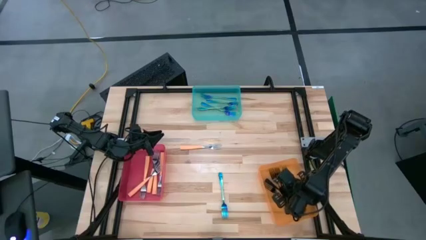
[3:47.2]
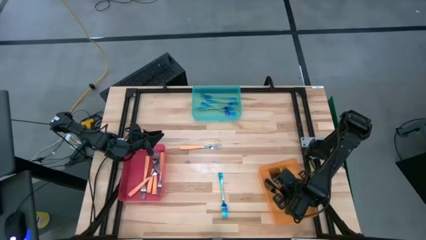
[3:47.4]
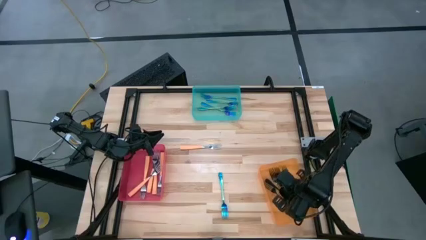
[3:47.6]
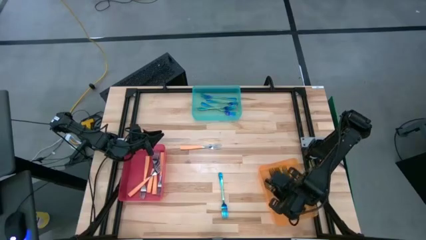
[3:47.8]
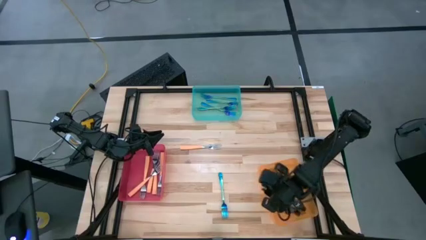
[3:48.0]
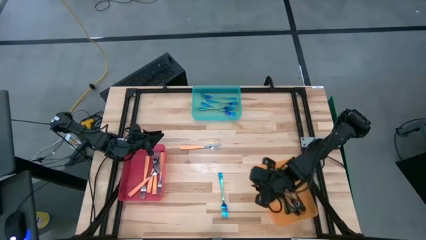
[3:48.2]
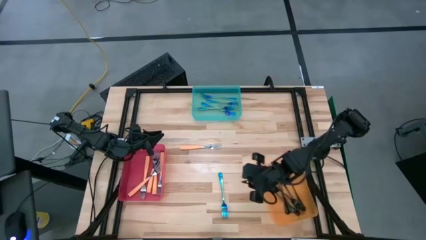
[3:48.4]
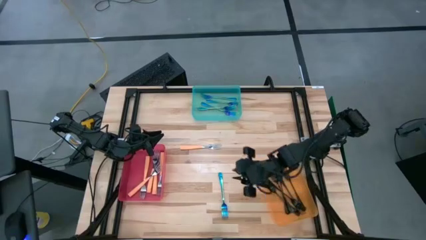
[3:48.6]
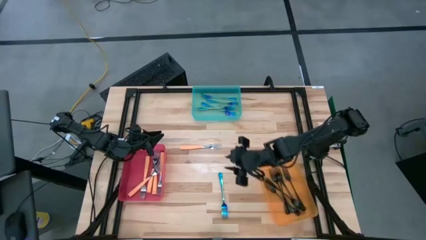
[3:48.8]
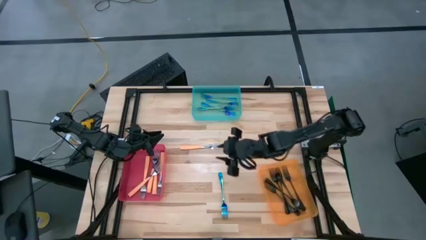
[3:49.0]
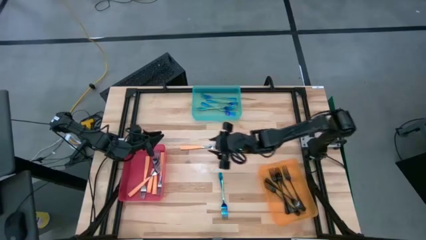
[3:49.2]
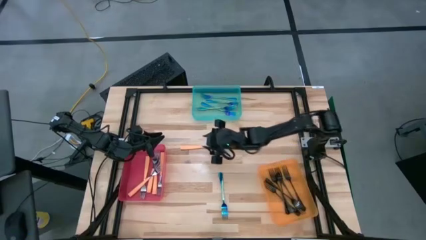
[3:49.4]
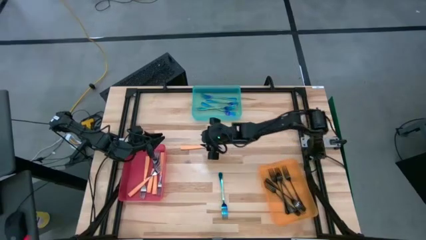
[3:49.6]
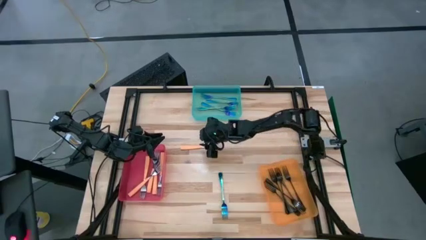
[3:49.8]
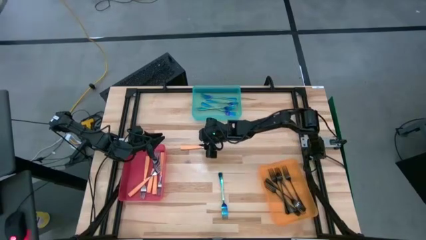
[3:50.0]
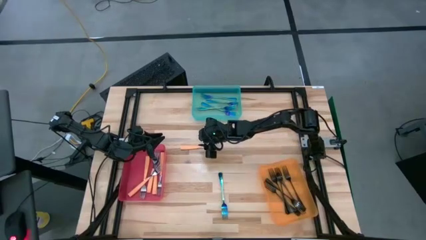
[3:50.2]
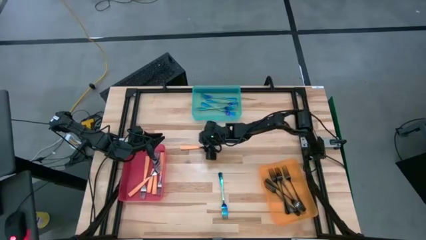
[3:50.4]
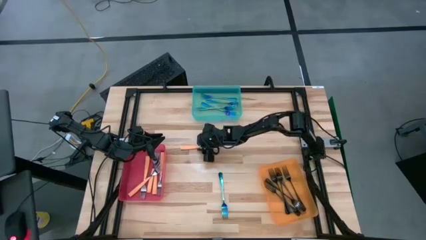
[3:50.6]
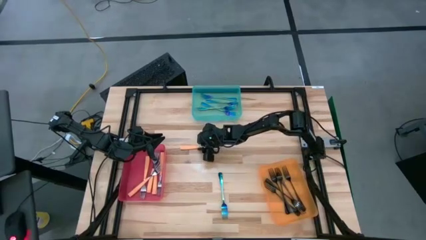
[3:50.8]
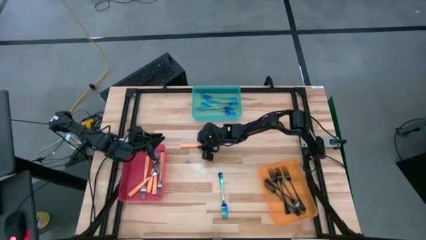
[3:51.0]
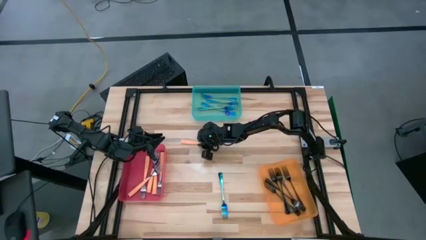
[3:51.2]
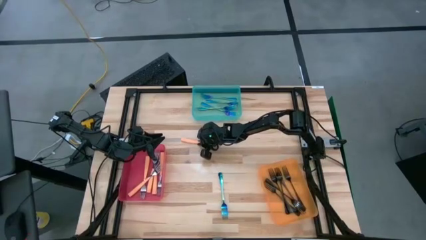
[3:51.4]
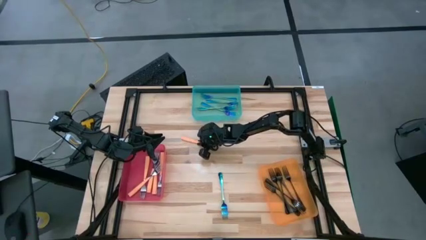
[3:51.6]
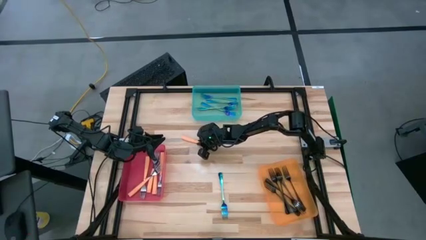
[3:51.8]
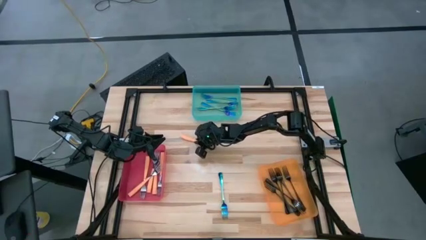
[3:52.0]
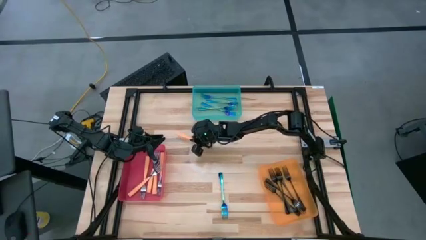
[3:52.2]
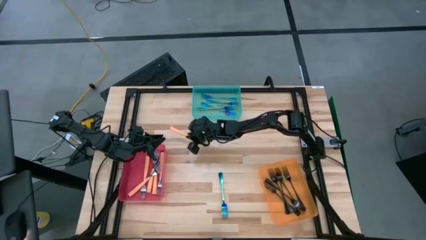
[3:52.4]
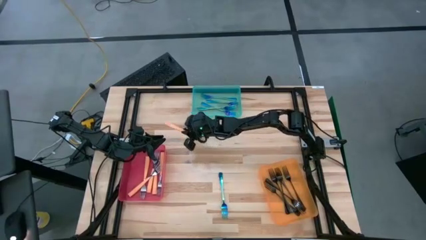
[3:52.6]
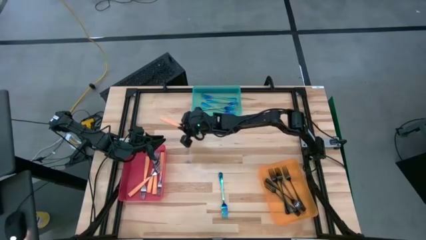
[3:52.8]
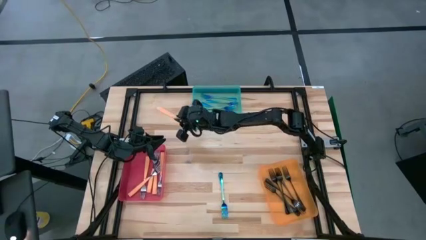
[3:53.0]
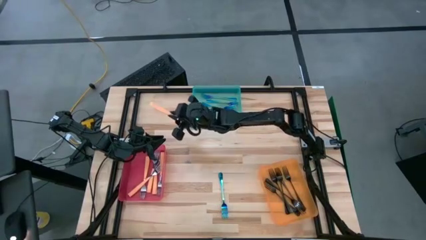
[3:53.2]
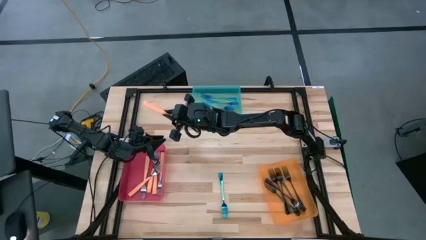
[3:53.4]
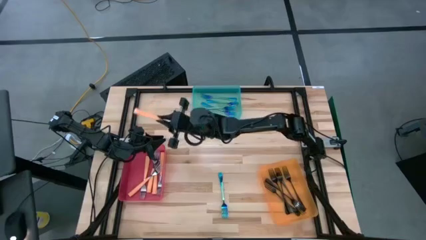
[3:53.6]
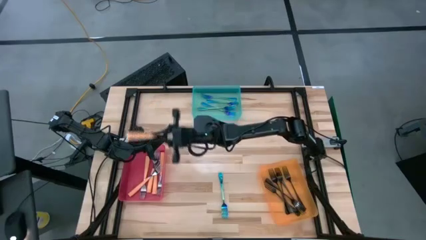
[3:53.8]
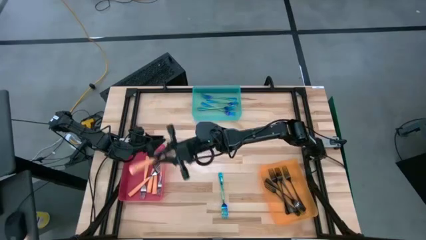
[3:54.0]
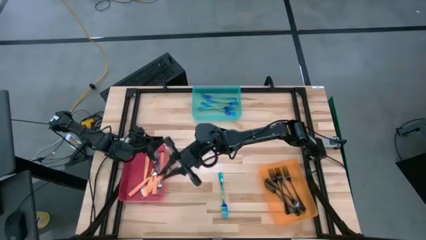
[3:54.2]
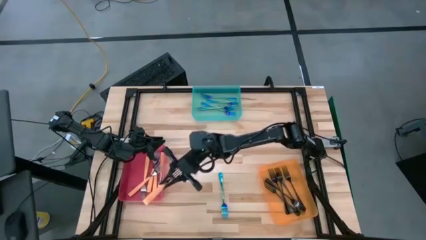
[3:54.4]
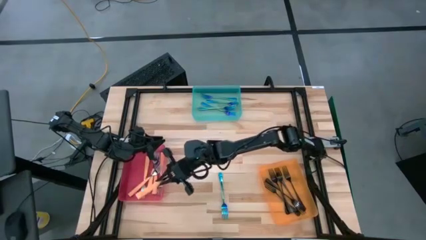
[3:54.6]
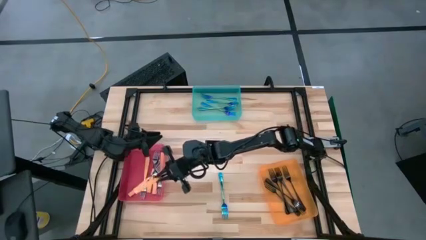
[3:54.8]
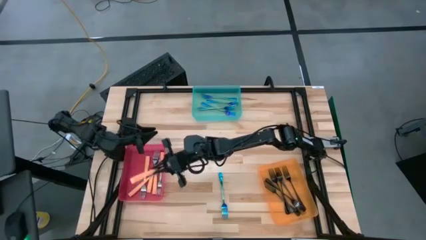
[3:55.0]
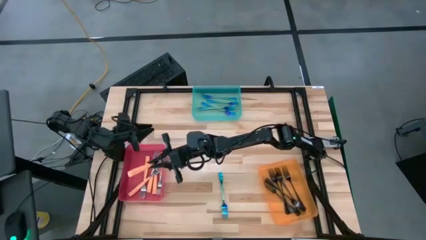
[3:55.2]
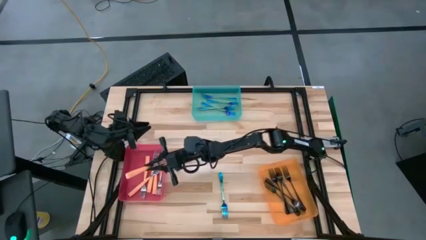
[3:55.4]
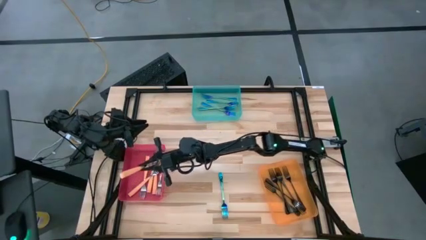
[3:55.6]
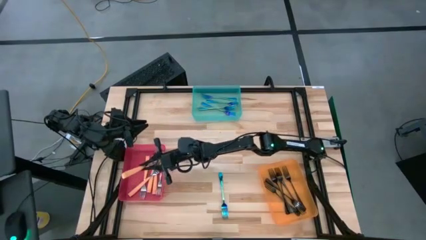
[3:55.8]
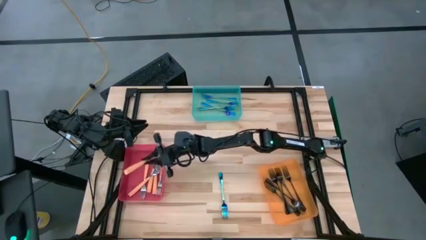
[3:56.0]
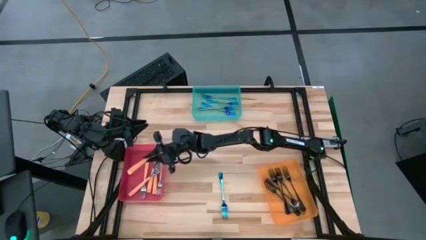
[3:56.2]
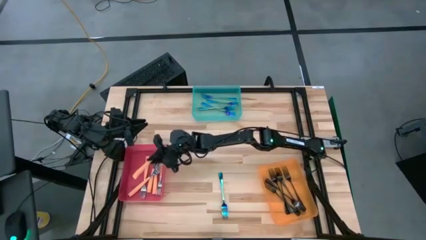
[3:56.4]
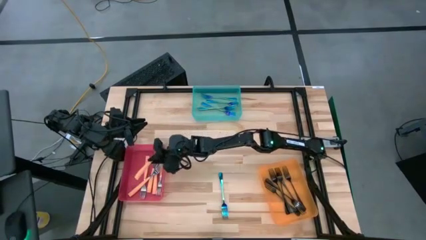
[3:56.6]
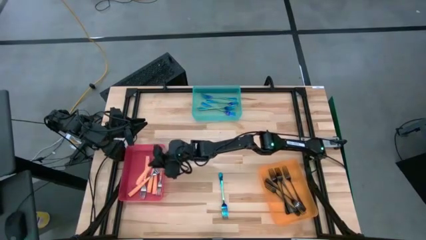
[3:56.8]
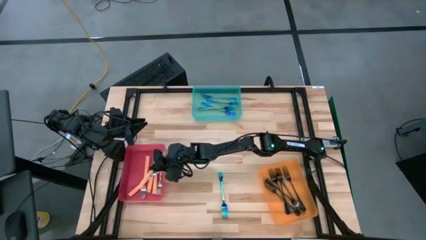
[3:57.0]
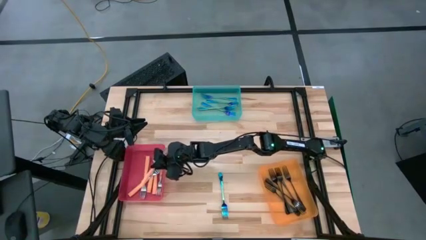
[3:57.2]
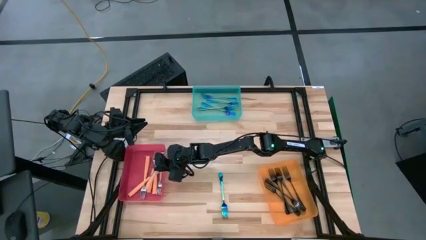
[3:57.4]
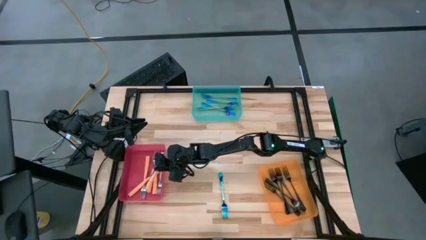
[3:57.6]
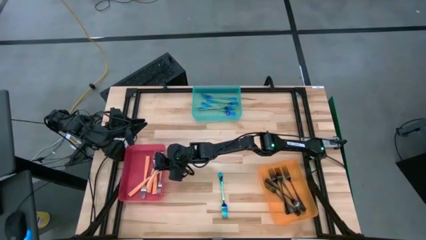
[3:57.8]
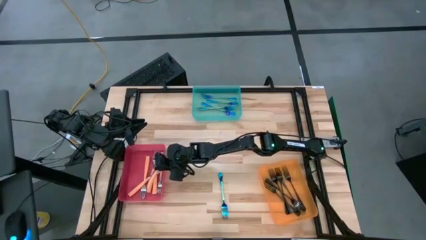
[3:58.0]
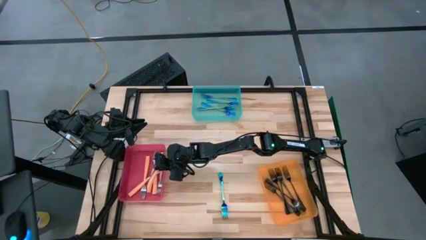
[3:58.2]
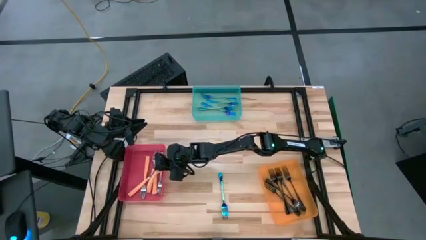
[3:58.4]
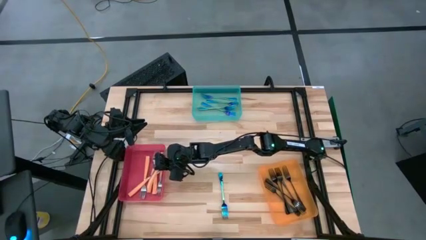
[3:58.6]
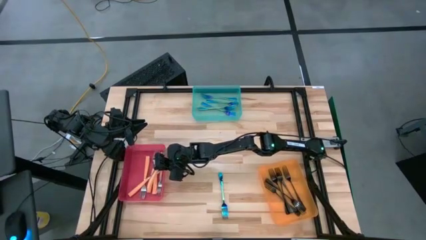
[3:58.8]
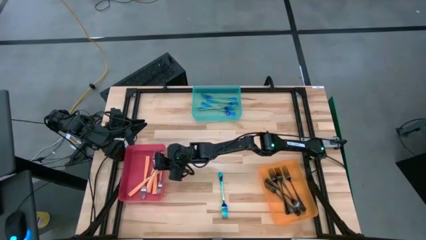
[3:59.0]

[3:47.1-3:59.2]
Task: Sort silverware by color (type)
Put the orange fork into the red bin

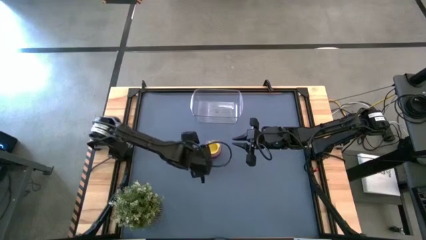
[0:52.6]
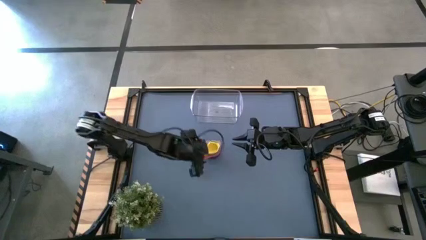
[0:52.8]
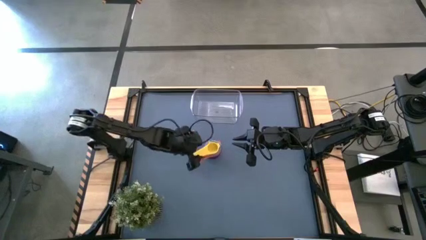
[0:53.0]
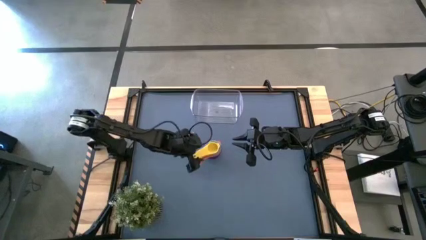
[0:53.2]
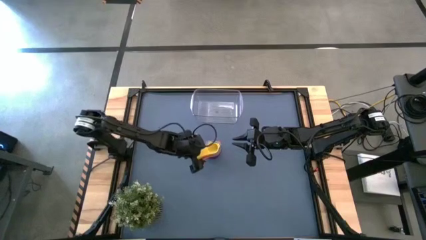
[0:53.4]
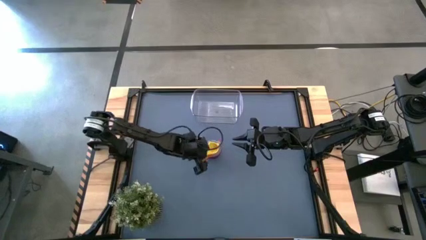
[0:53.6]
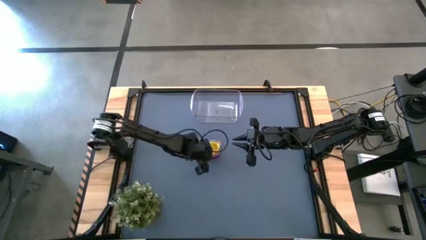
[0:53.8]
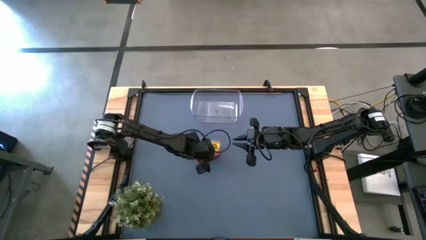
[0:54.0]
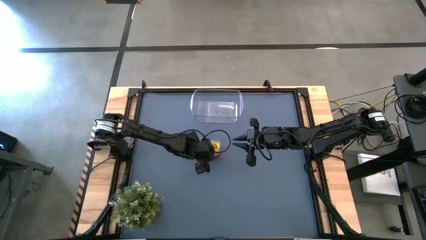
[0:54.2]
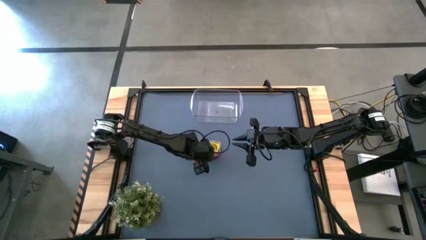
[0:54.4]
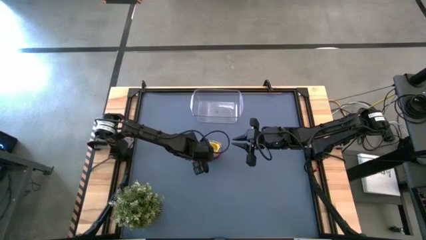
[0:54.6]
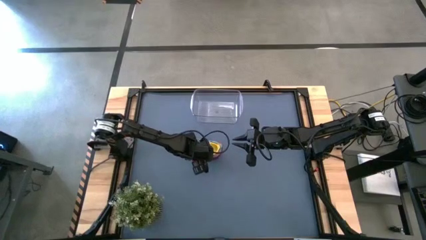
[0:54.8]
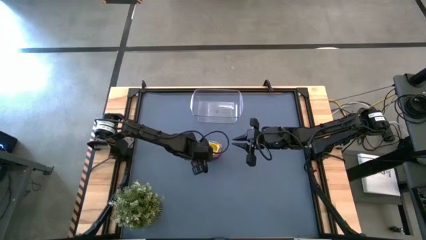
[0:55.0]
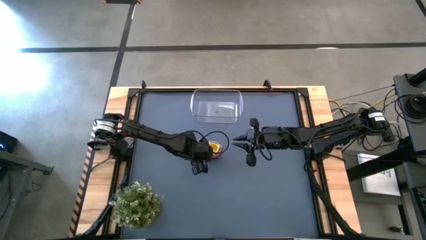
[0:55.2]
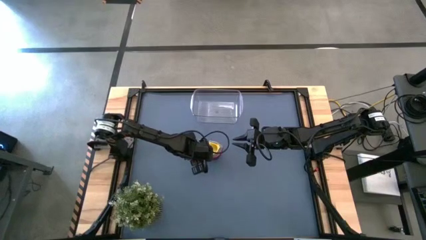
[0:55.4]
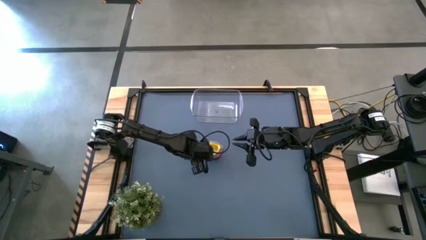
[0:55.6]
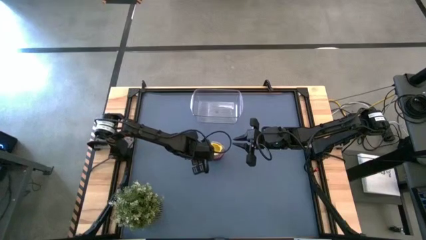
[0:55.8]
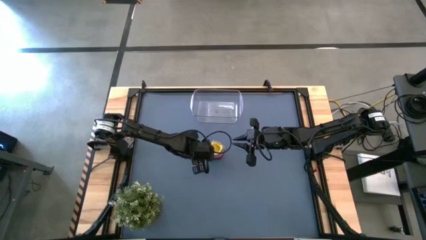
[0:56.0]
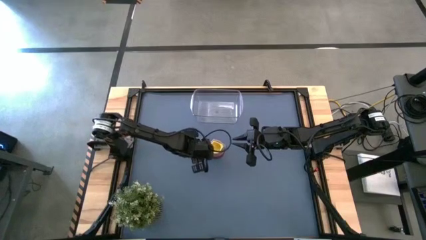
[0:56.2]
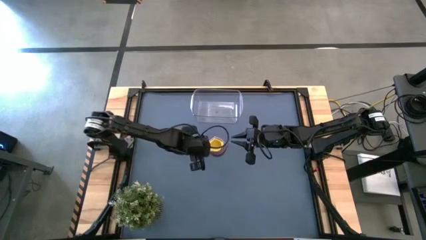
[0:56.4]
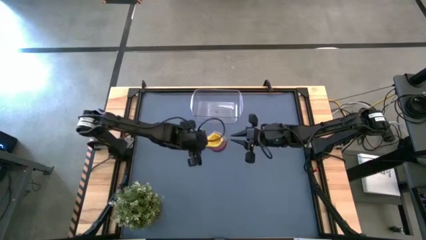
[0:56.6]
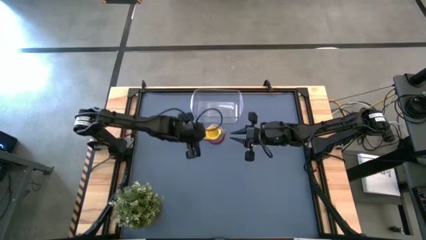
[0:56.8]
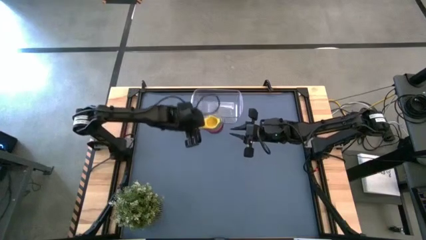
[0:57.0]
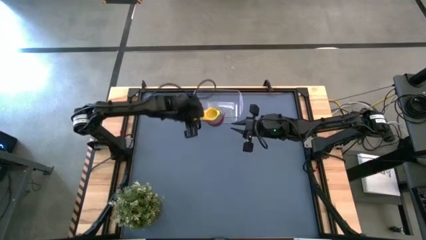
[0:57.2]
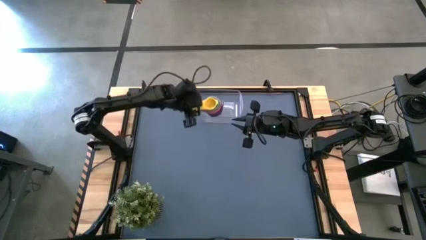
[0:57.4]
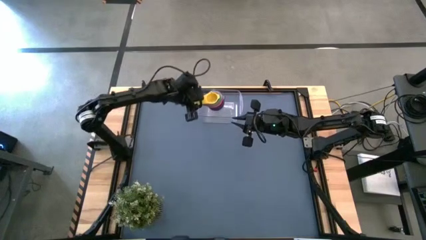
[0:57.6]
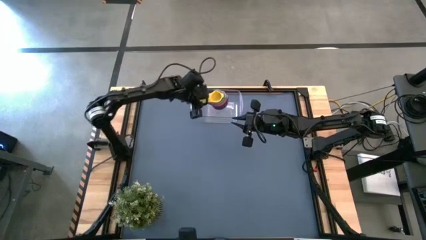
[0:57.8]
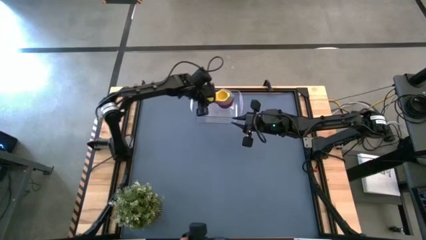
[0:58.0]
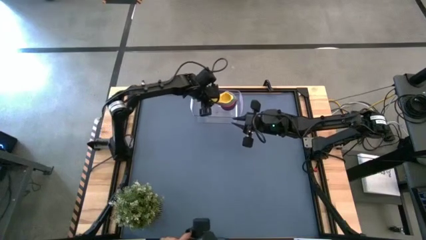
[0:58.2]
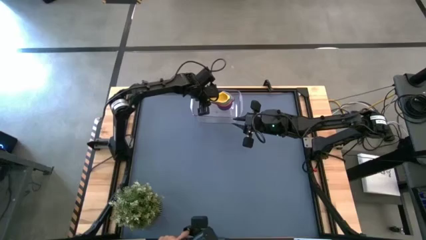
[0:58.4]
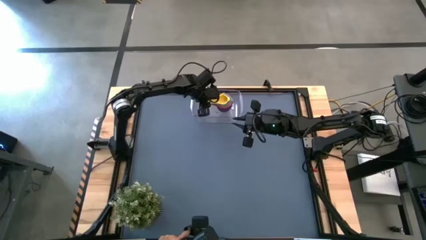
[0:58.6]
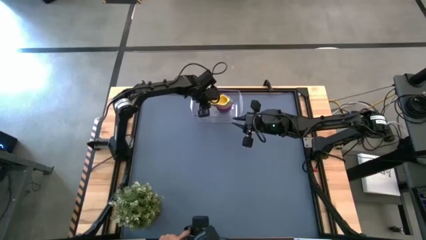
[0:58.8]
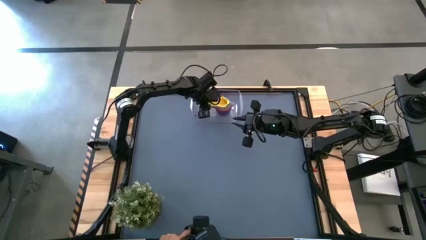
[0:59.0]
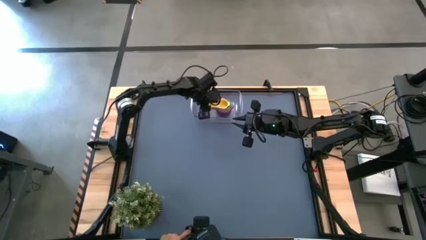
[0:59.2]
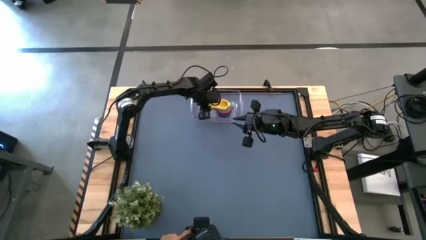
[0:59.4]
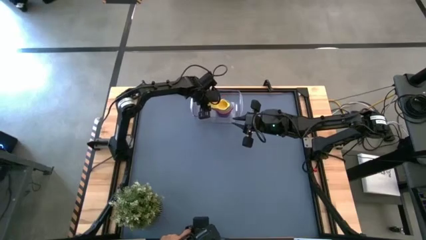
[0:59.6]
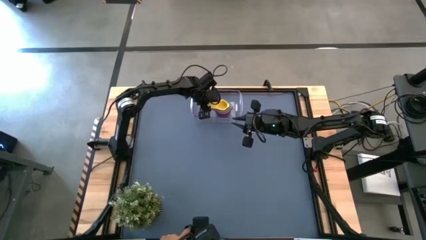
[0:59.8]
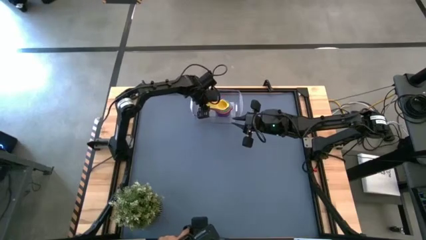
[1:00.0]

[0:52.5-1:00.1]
Task: Nest measuring cups in basket
Put the nested measuring cups into the transparent bin
